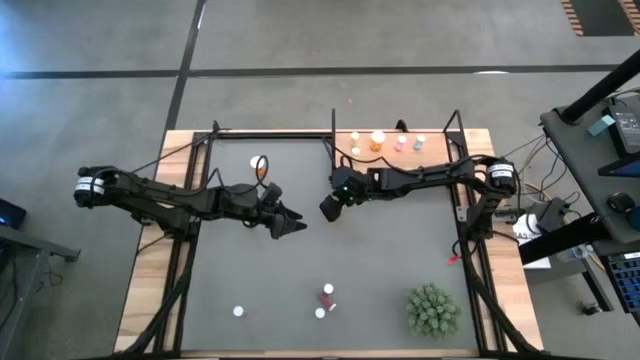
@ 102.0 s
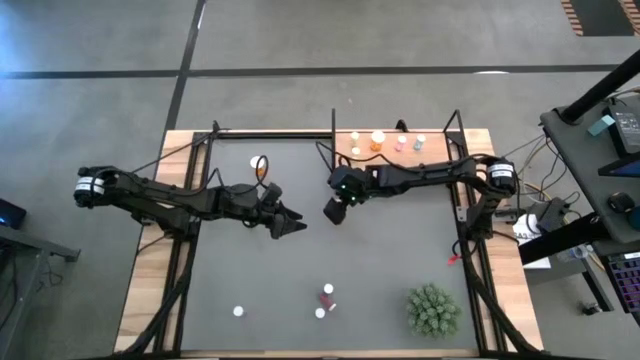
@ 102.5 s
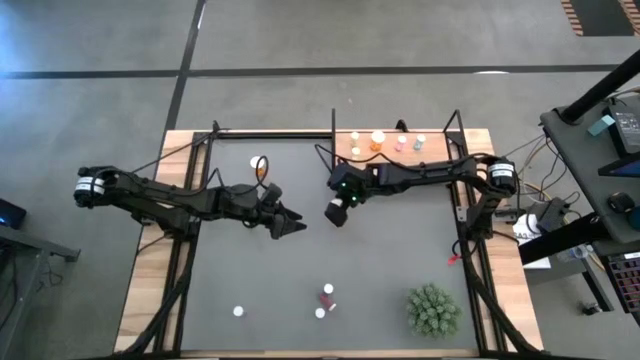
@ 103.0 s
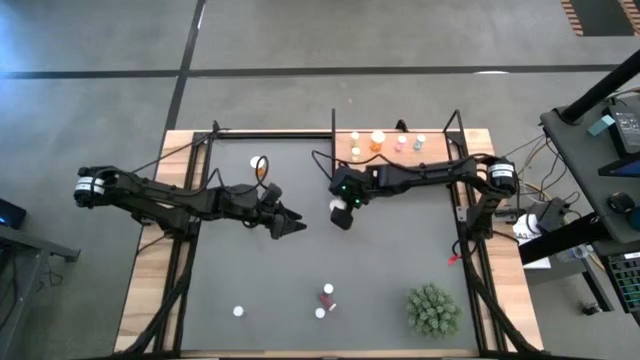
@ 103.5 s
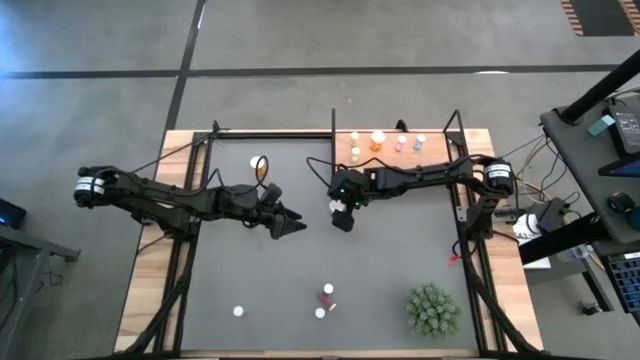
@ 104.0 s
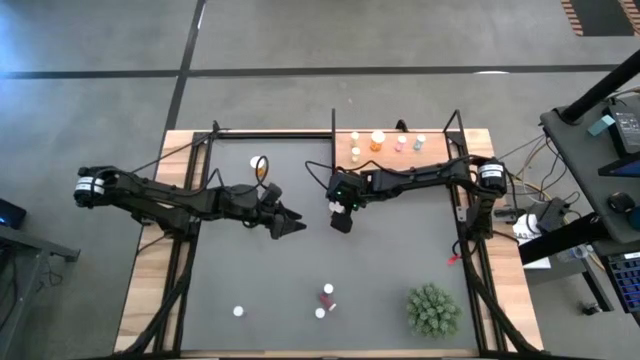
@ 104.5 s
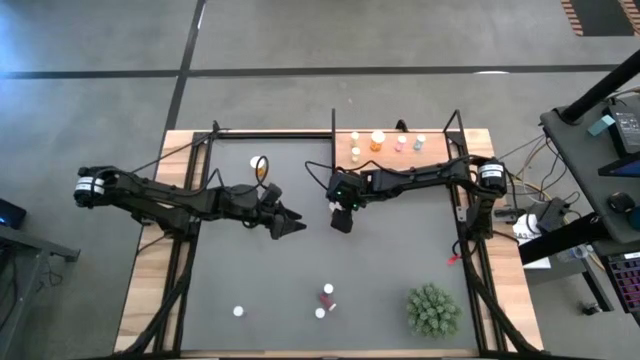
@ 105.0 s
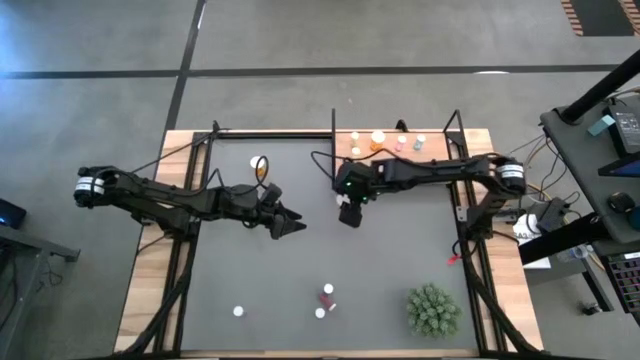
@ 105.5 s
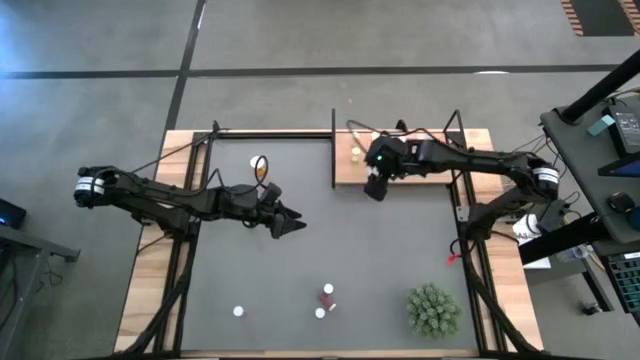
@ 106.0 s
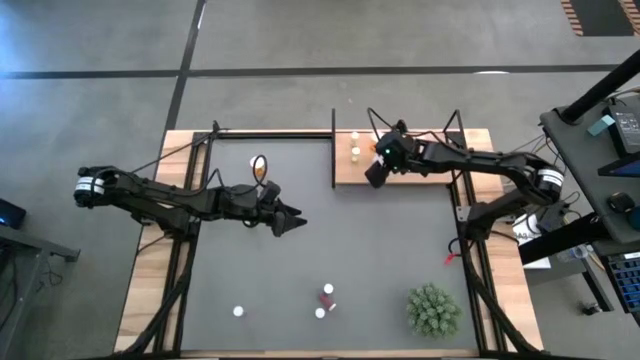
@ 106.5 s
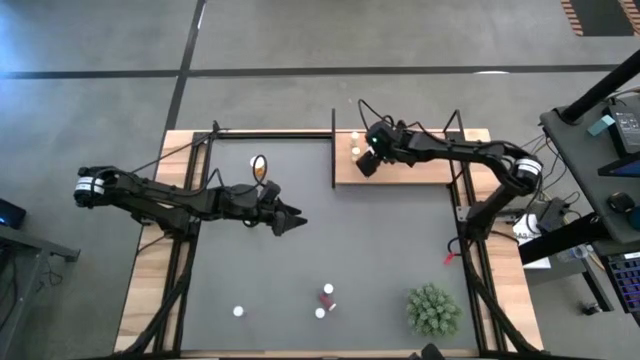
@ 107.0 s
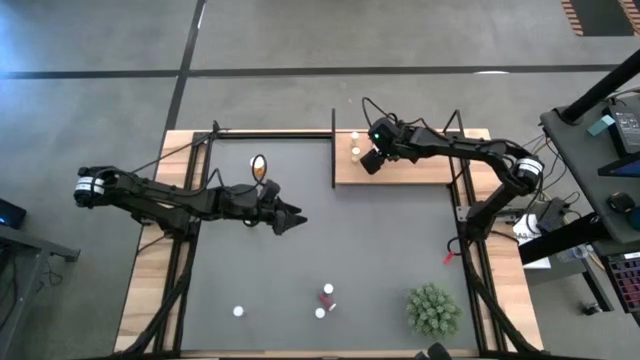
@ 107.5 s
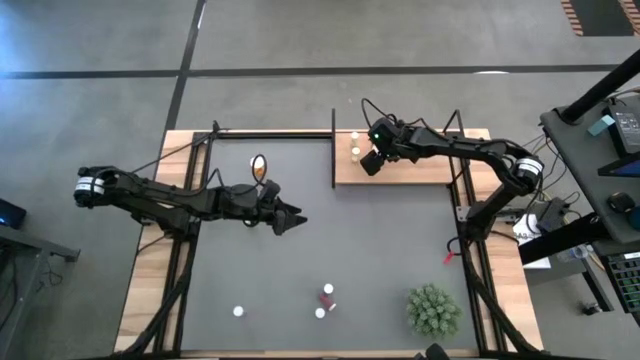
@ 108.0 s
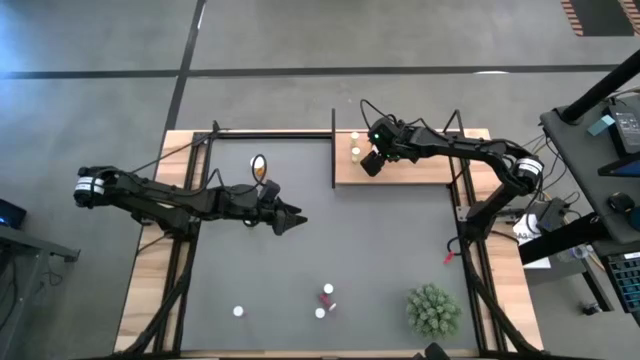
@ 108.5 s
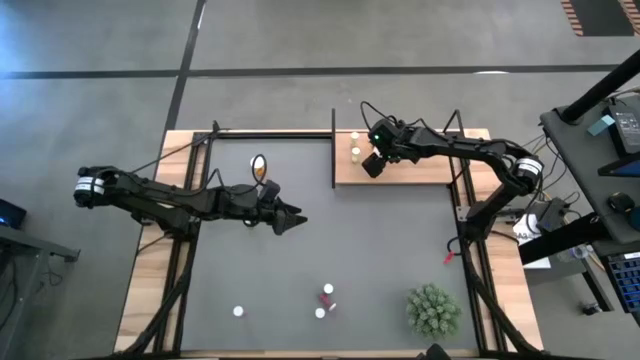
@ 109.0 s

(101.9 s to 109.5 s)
Task: Pick and place medicine bottles onto shelf by color
Put the bottom orange medicine bottle on the shelf aligned with the other orange medicine bottle

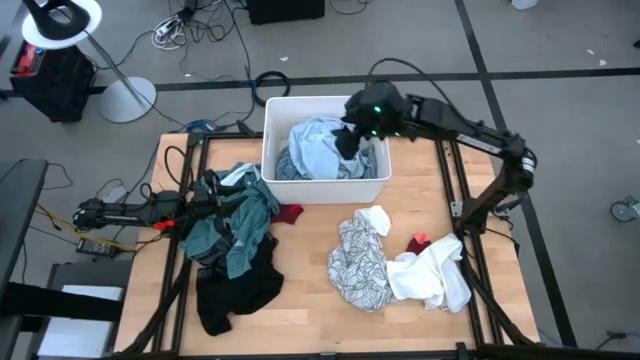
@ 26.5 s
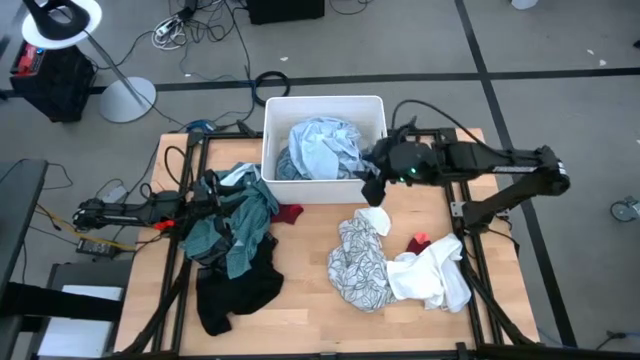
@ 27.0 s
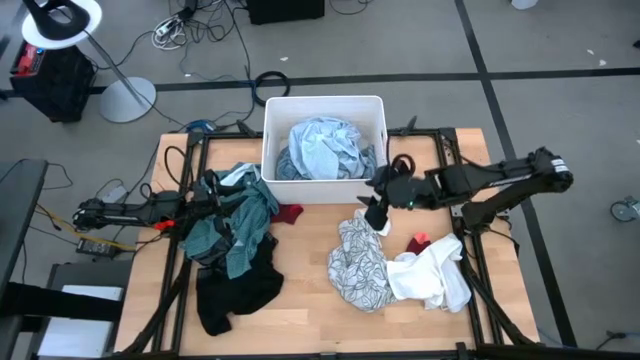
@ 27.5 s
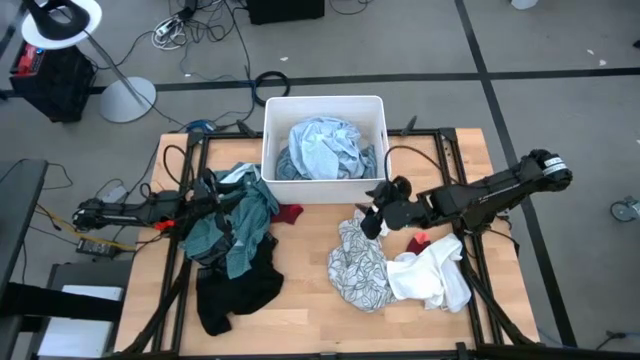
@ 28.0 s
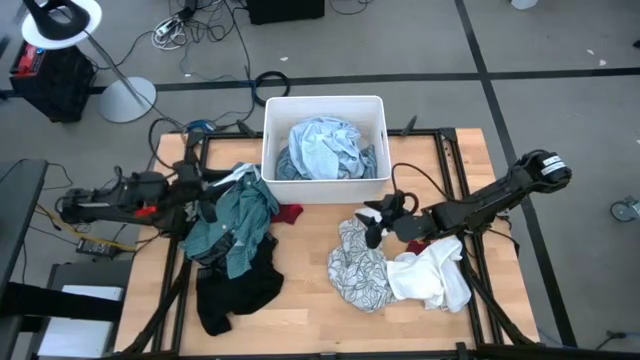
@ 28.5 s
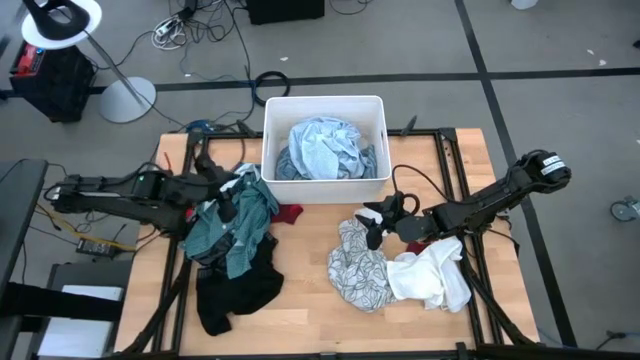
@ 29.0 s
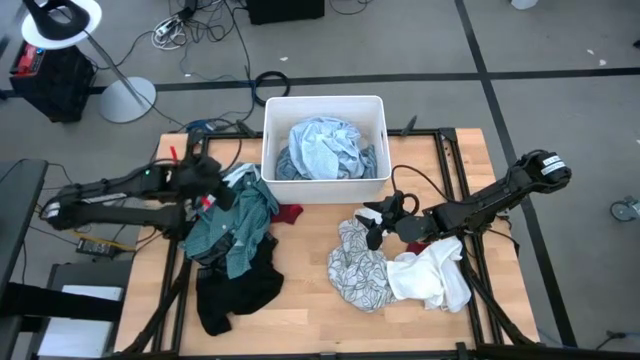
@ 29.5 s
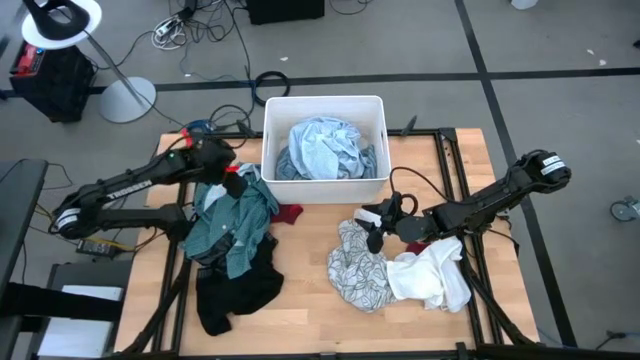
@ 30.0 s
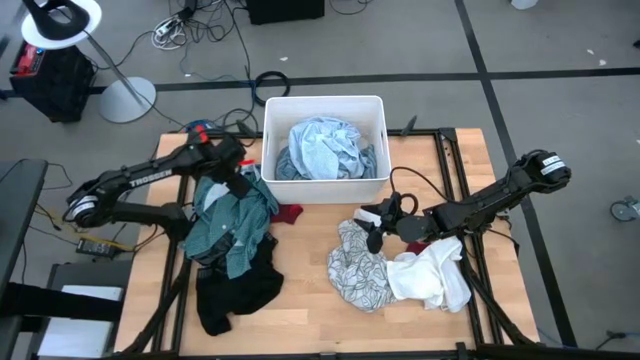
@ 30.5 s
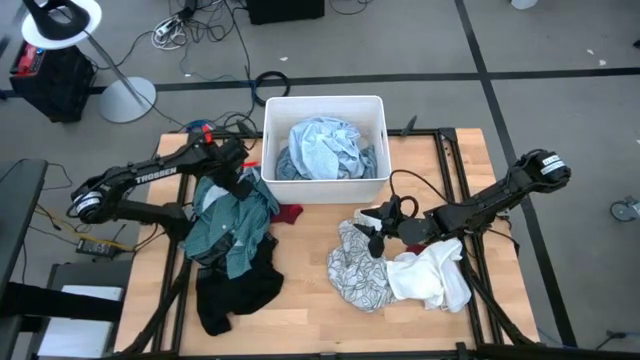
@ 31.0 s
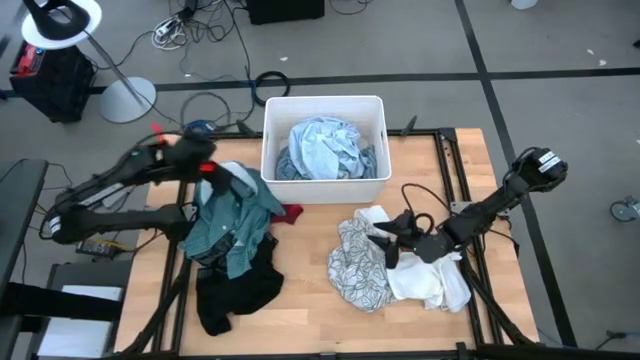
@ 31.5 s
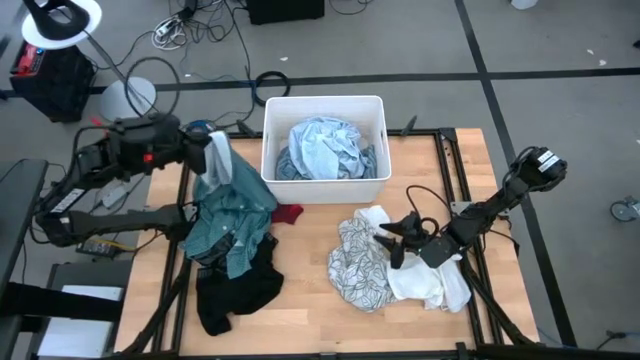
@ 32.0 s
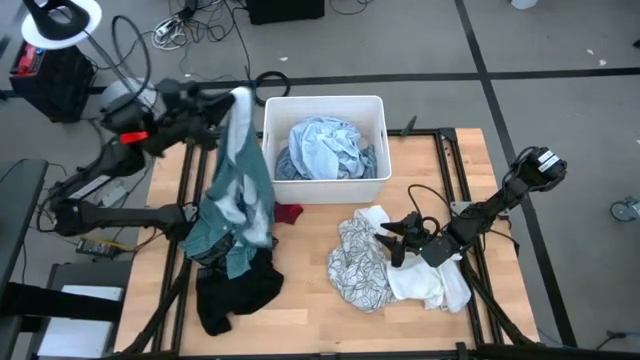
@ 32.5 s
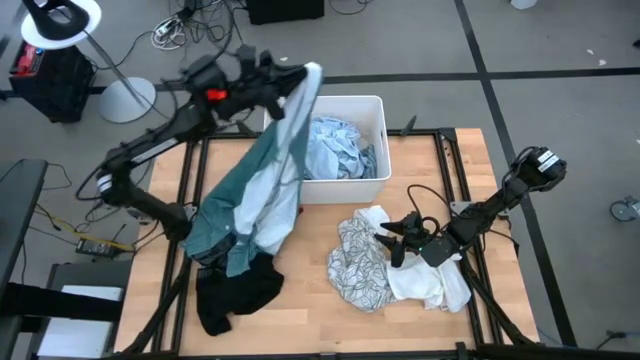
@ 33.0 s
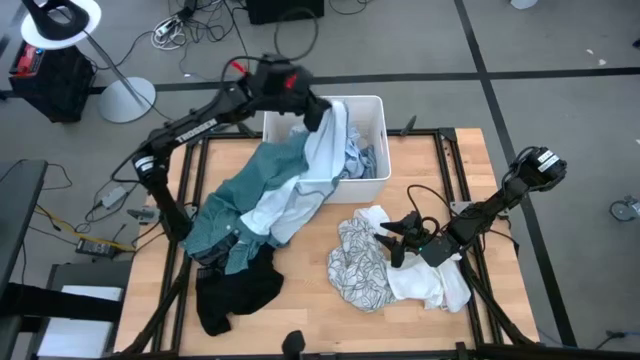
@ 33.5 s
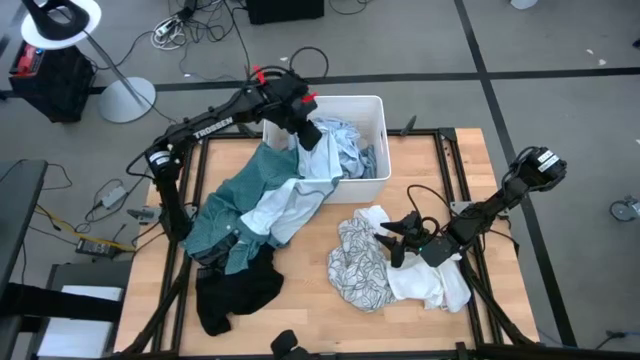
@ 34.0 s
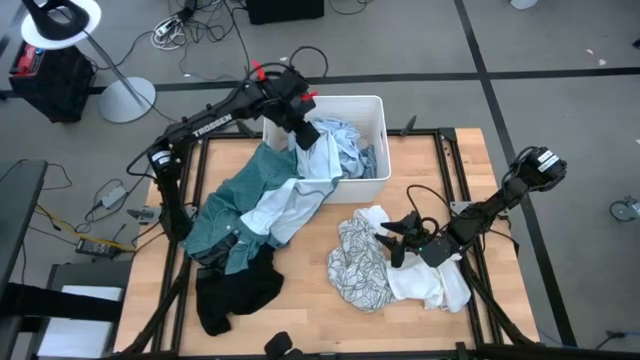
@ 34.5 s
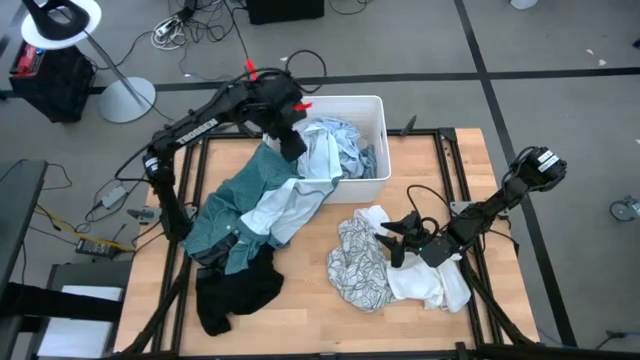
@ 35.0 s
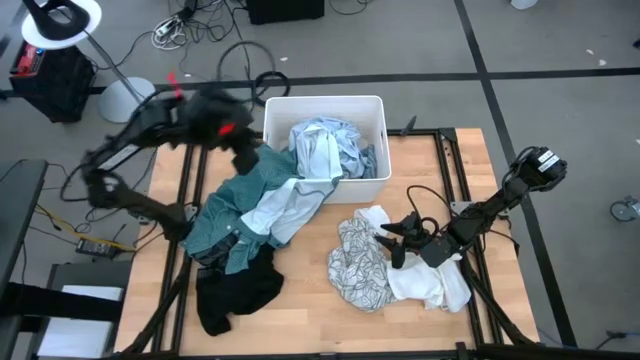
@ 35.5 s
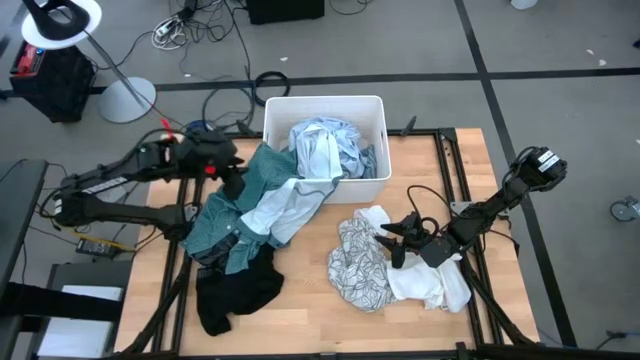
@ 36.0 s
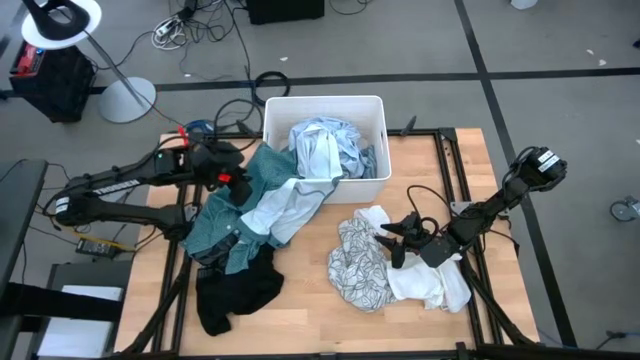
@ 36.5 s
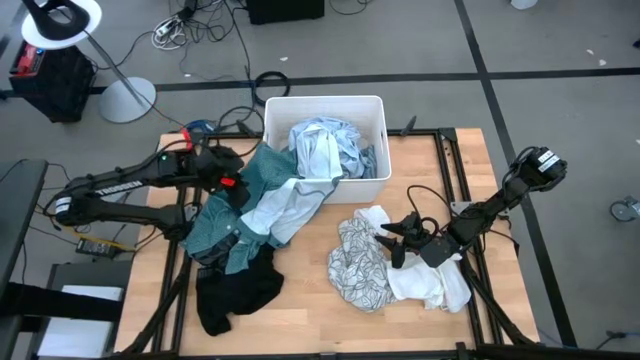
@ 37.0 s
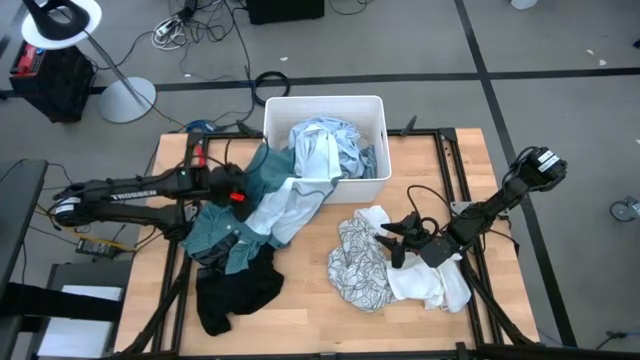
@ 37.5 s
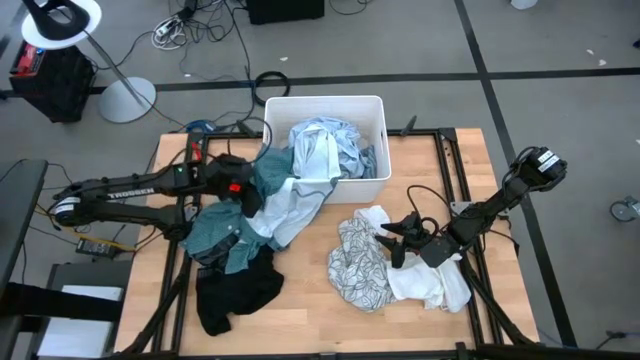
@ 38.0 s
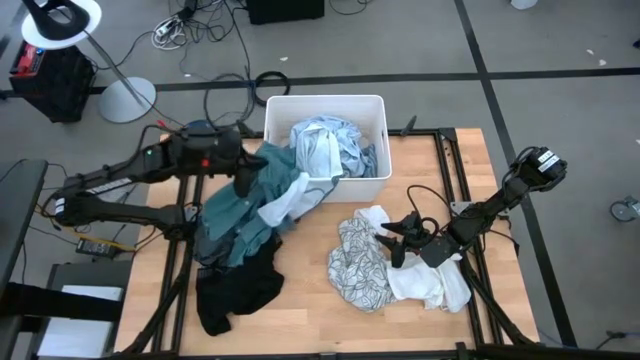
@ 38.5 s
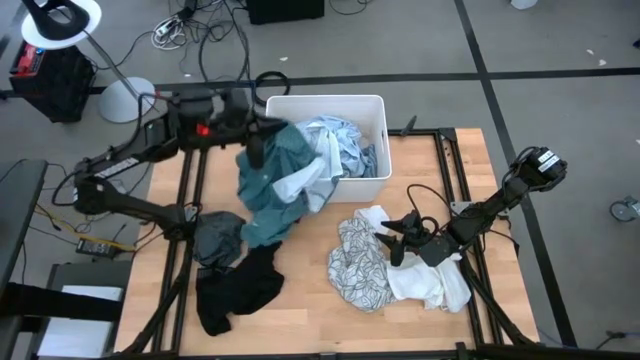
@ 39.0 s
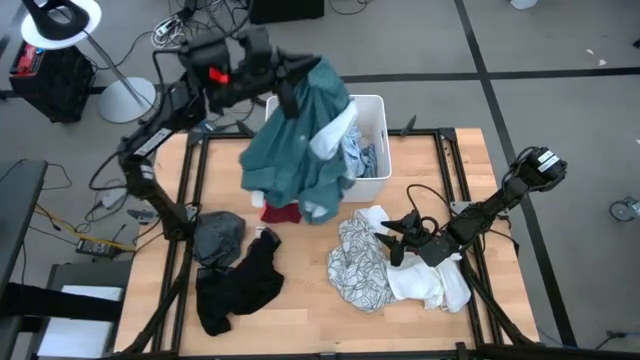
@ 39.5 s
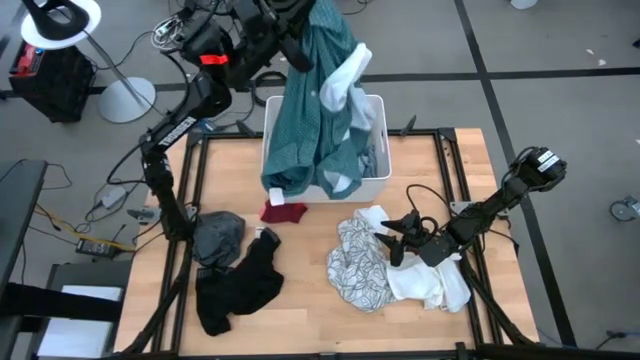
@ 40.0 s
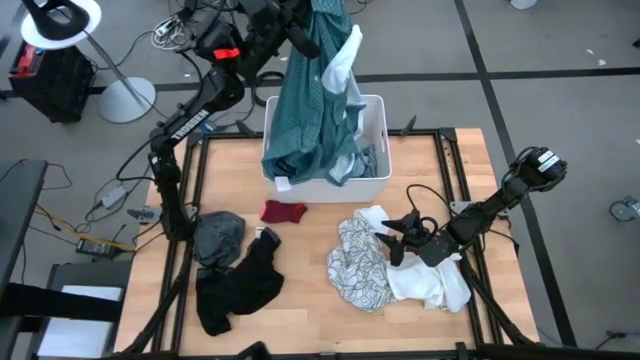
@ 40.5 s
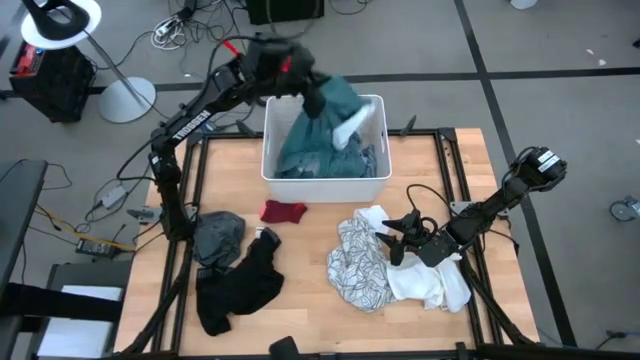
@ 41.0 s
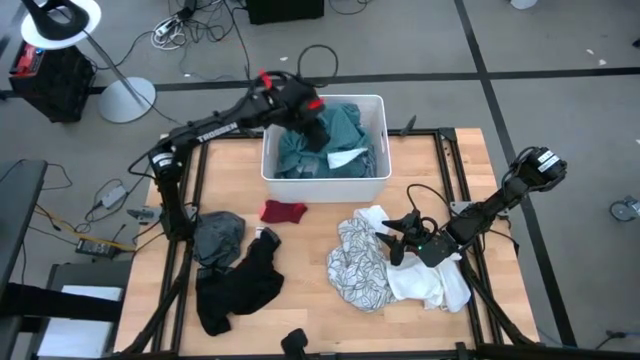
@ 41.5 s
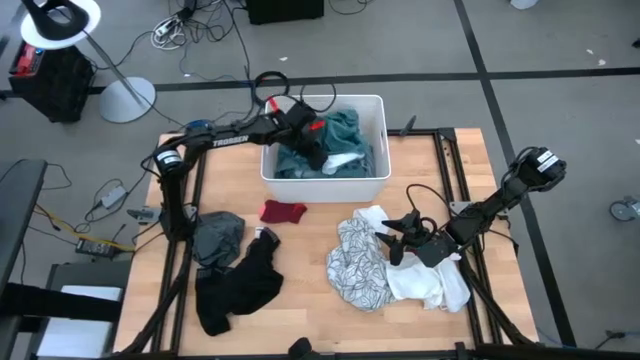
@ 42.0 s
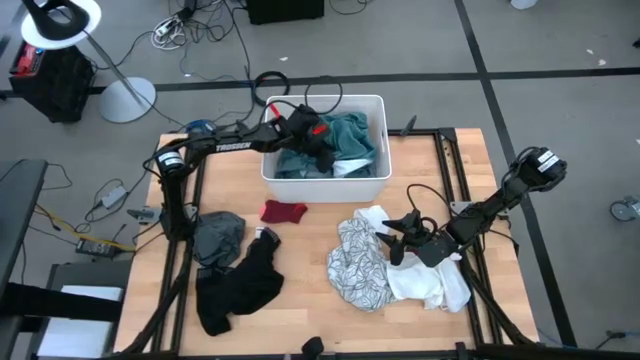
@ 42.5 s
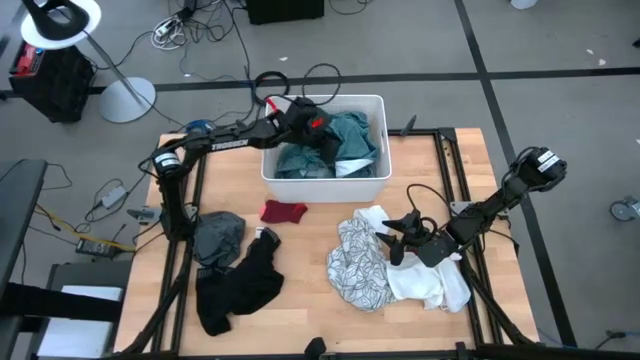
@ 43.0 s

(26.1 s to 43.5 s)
Task: Sort clothes
Put the green polo into the white laundry bin
